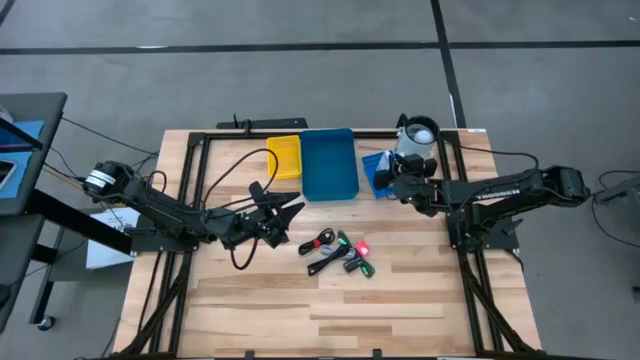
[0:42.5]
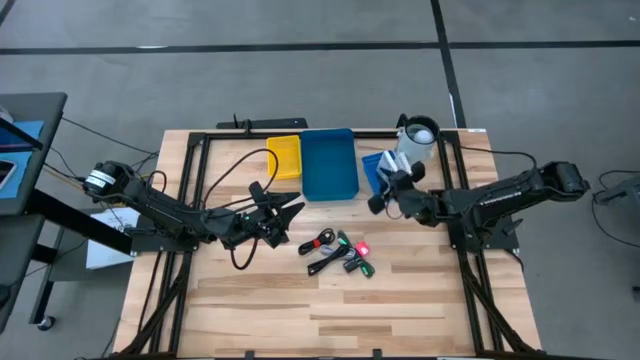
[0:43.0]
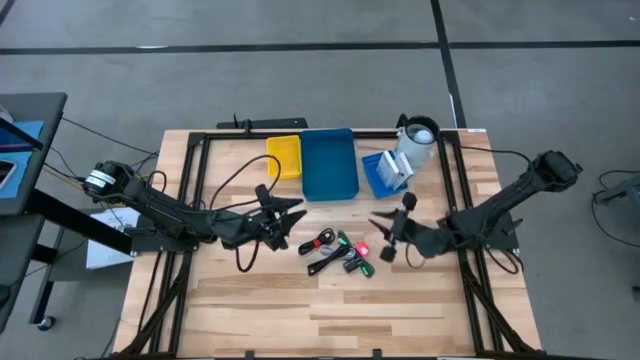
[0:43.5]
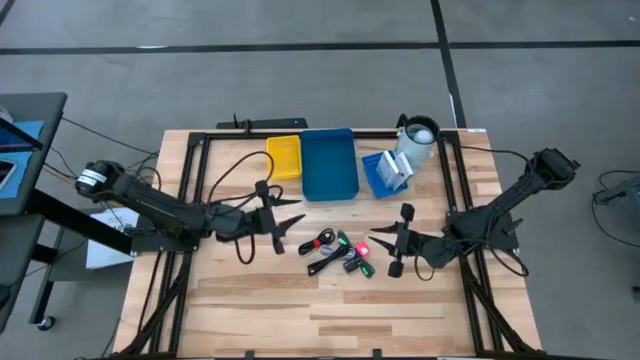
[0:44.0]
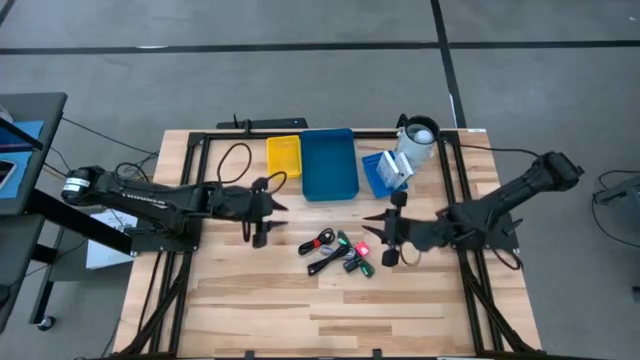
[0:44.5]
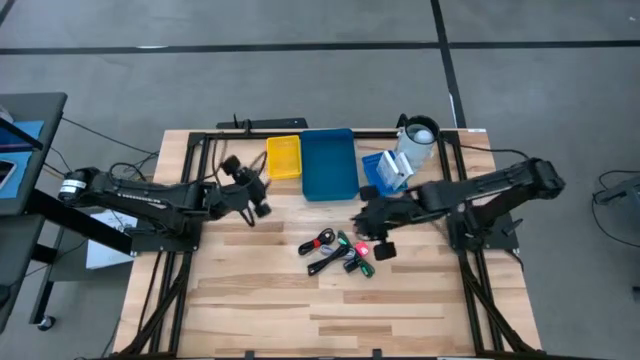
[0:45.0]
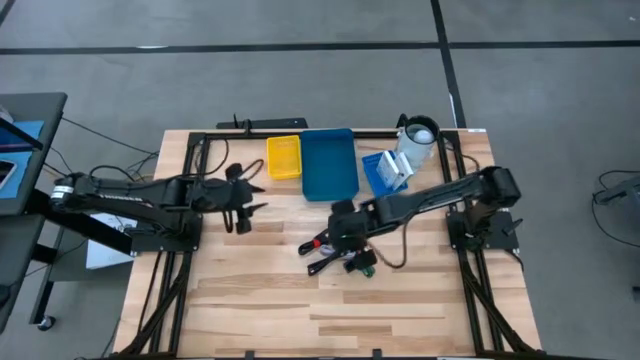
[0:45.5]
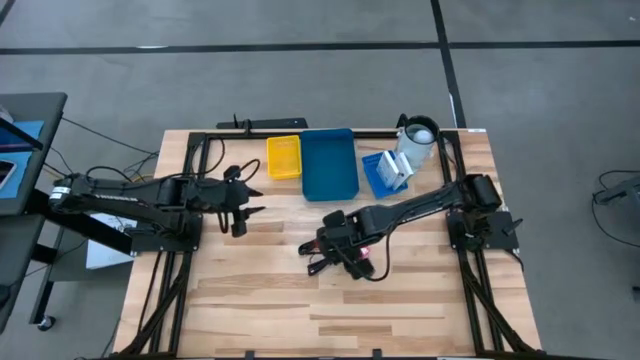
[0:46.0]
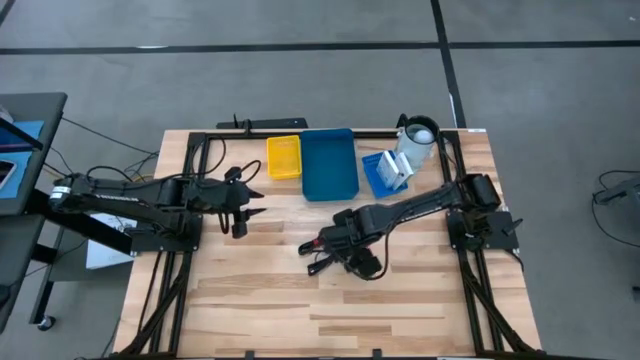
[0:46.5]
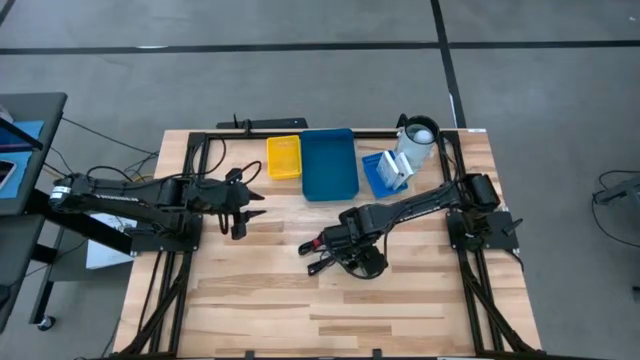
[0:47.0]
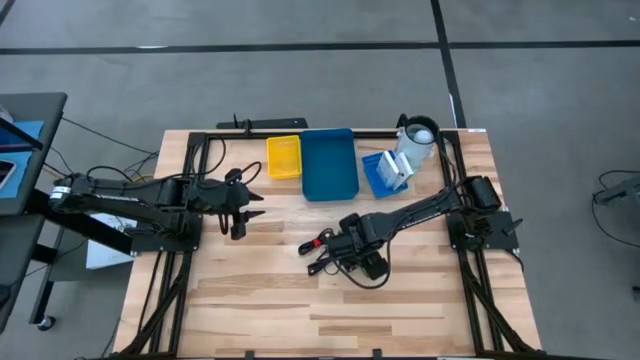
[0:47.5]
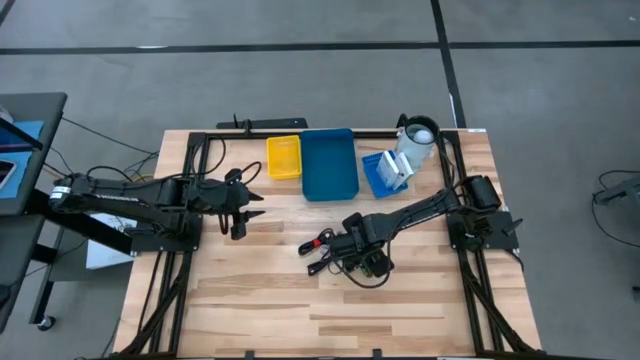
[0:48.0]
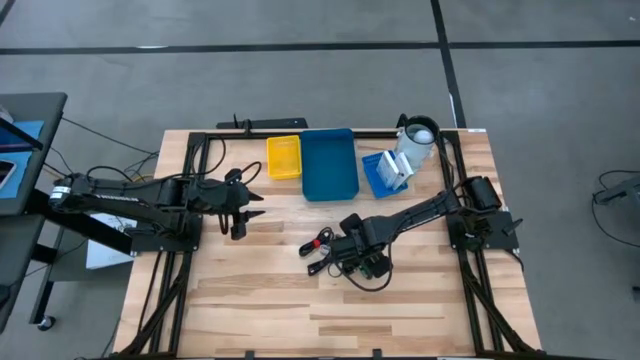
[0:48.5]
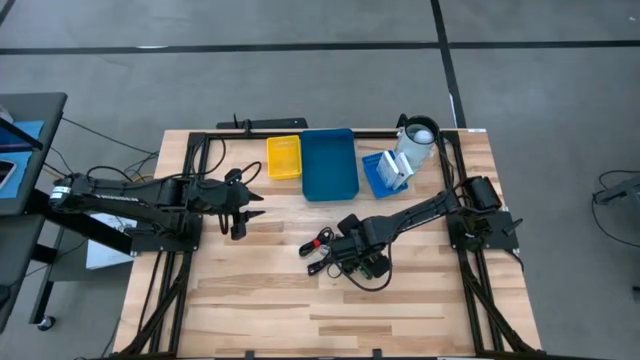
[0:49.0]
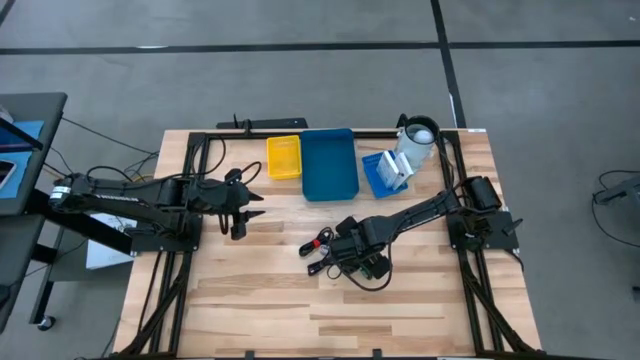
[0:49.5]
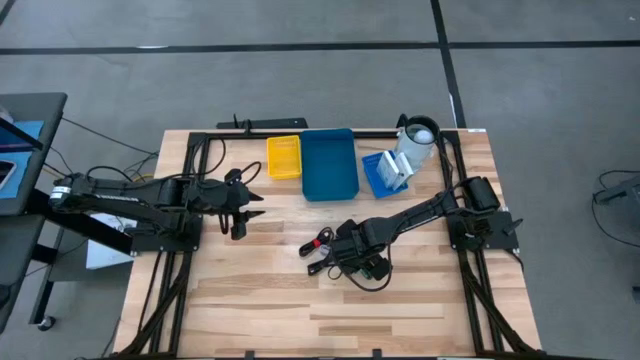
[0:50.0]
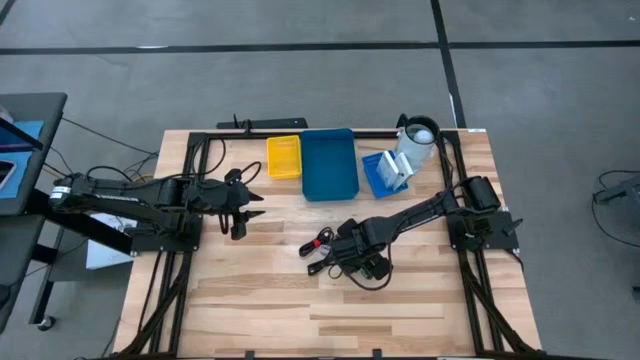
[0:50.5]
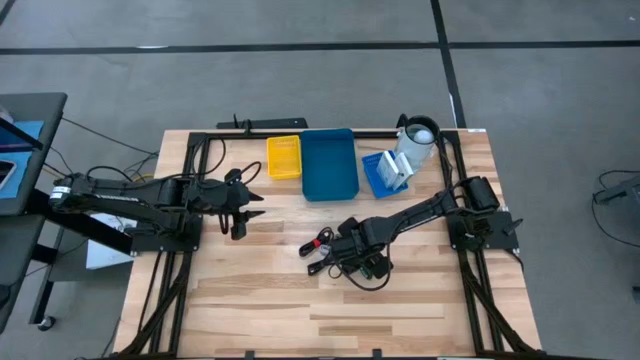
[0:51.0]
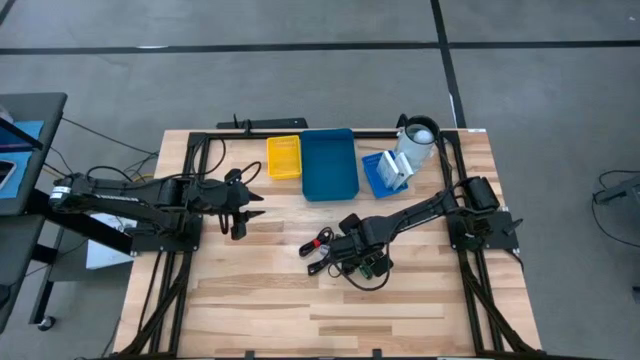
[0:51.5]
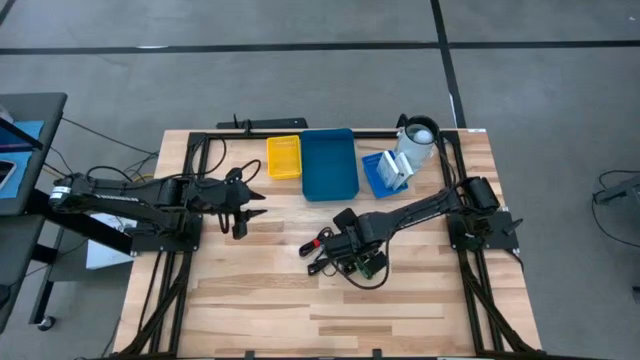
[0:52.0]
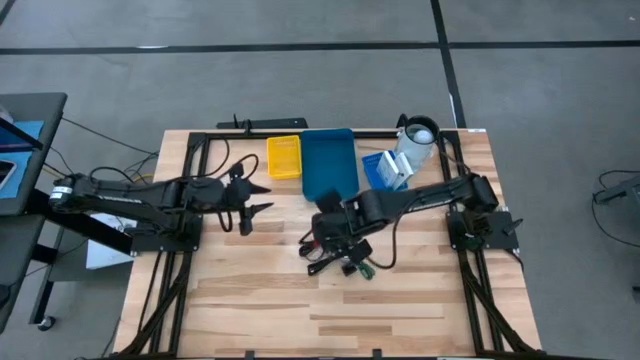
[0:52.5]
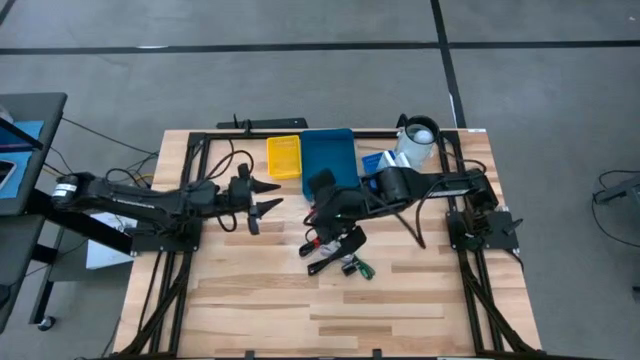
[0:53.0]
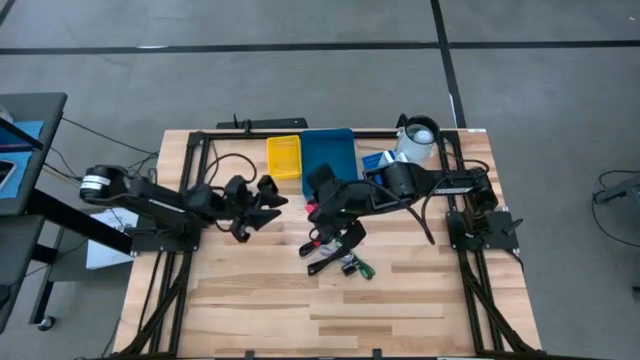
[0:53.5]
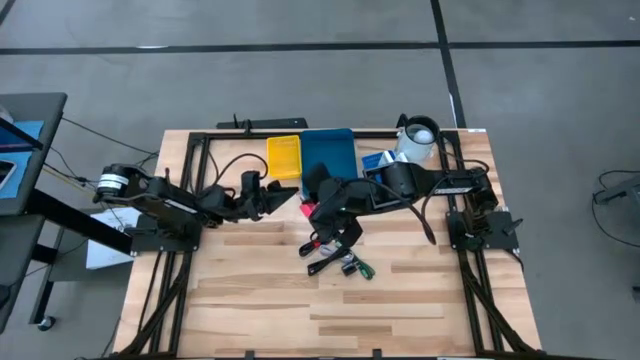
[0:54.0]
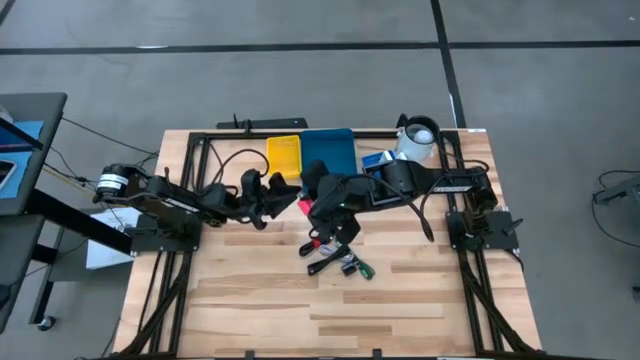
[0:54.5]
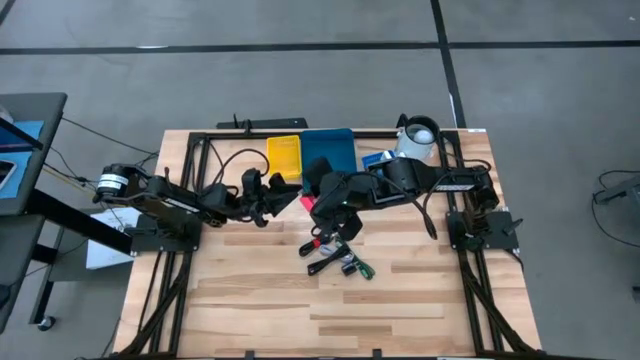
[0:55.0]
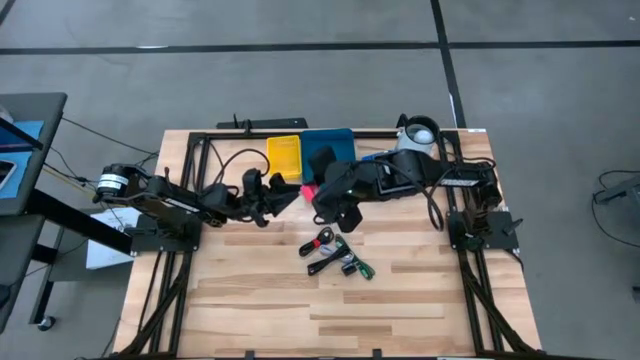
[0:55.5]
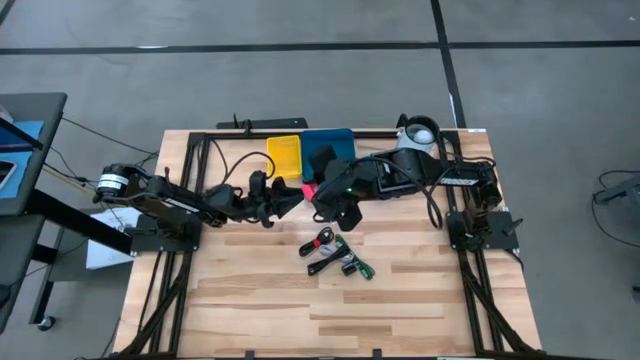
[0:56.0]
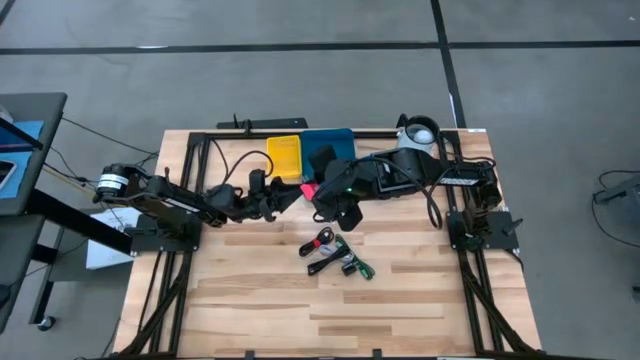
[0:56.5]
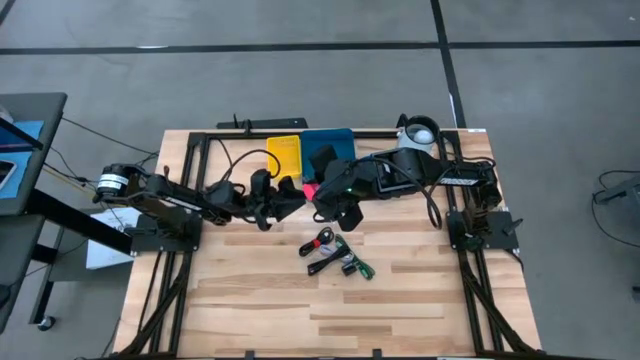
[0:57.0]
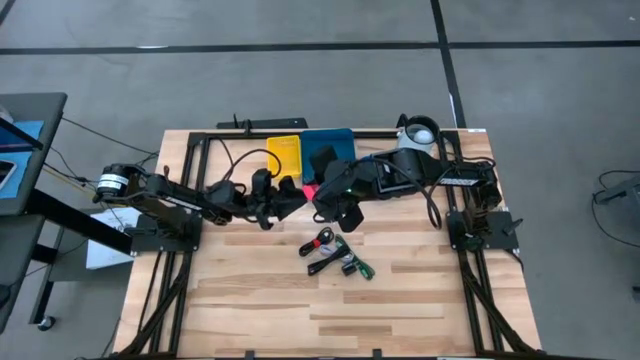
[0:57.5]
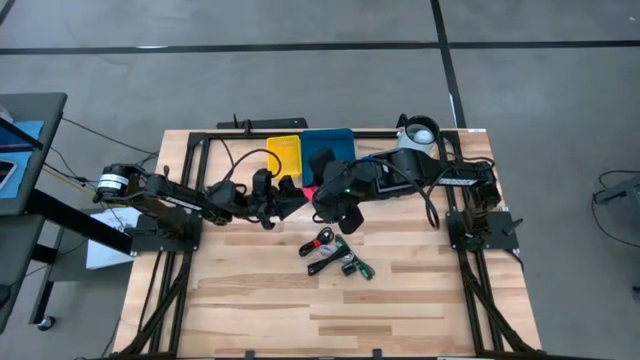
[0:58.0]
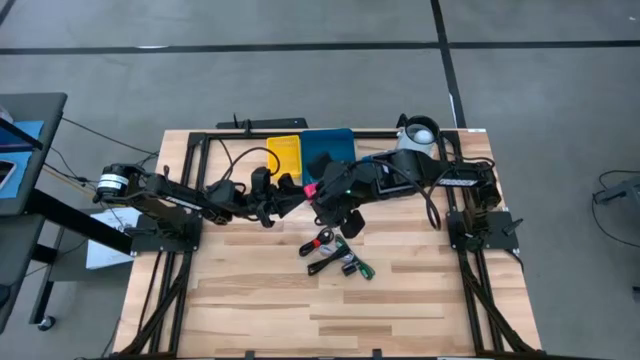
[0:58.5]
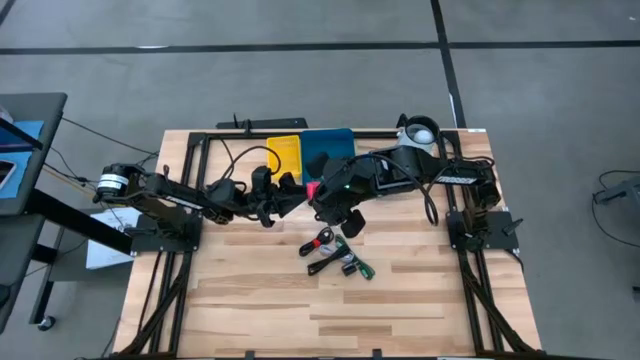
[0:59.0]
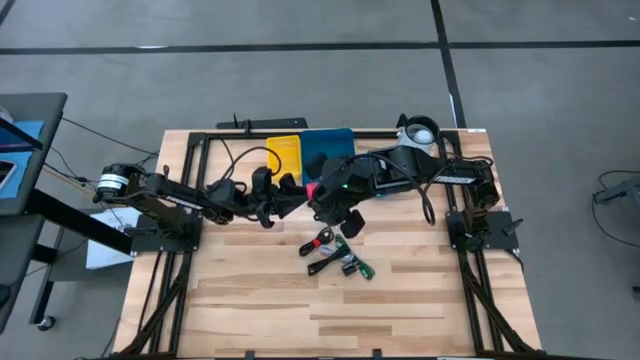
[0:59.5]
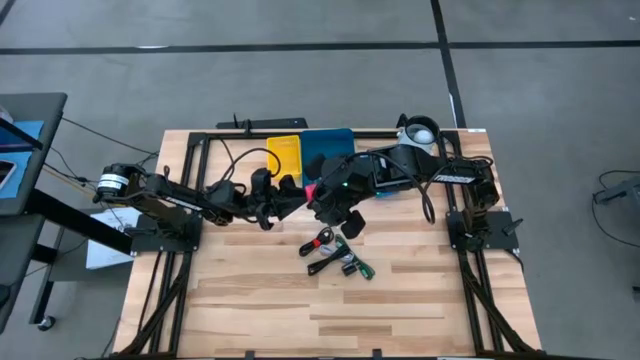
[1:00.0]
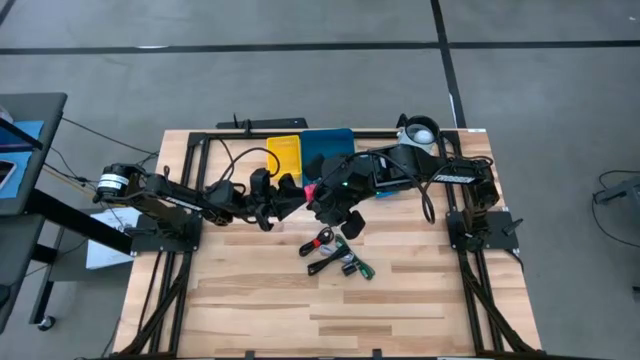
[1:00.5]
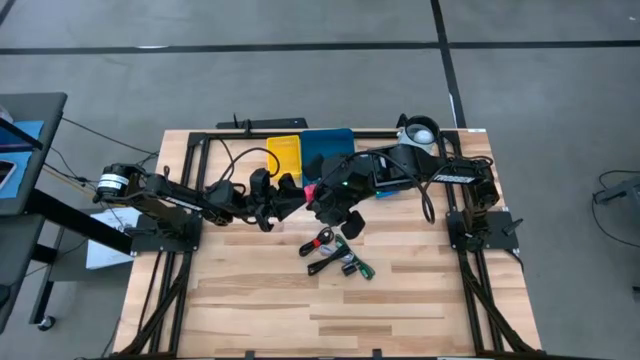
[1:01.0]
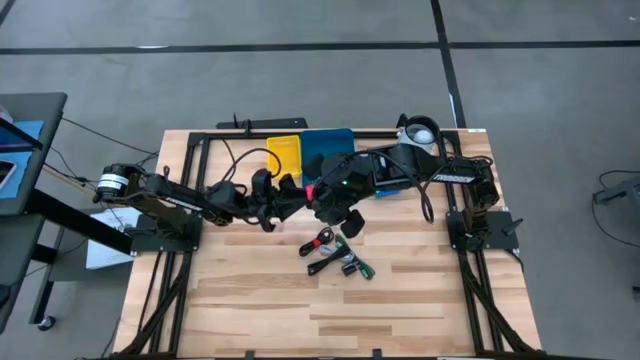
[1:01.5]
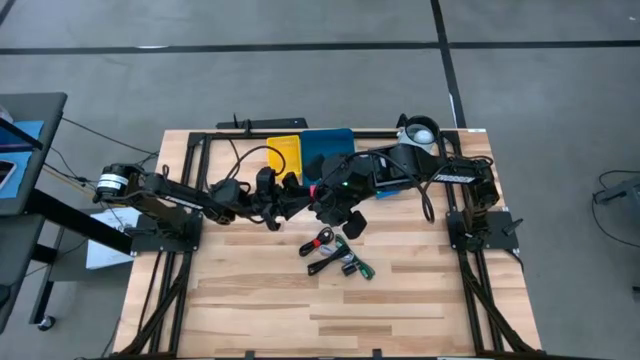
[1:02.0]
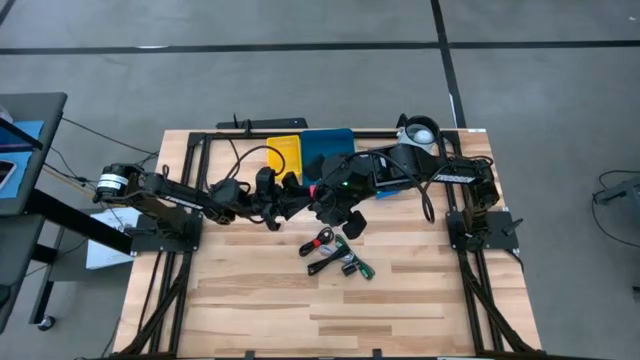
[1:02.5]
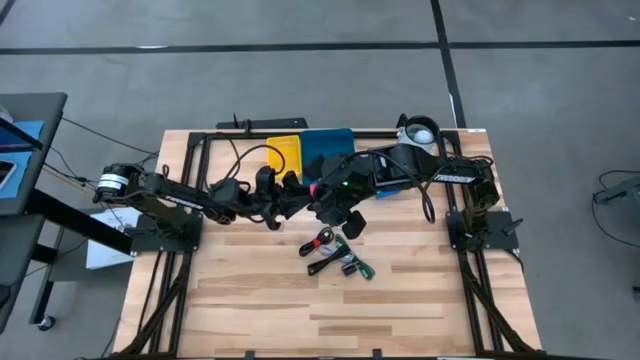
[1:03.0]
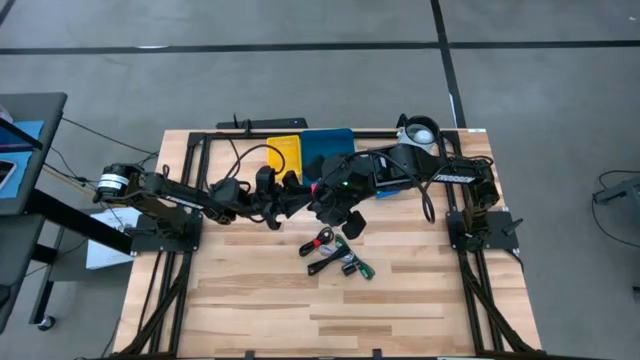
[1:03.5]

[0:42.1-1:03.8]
Task: Pick and place items into bin
Put the pink charger adapter into the yellow basket

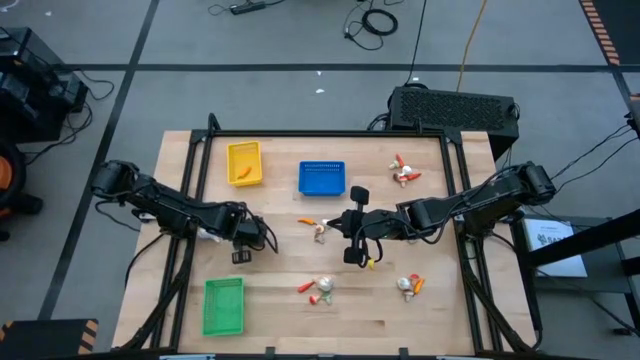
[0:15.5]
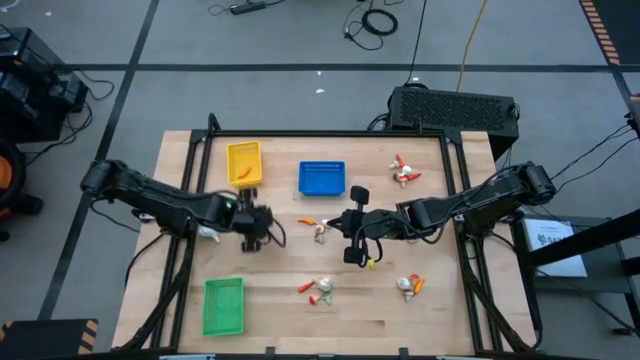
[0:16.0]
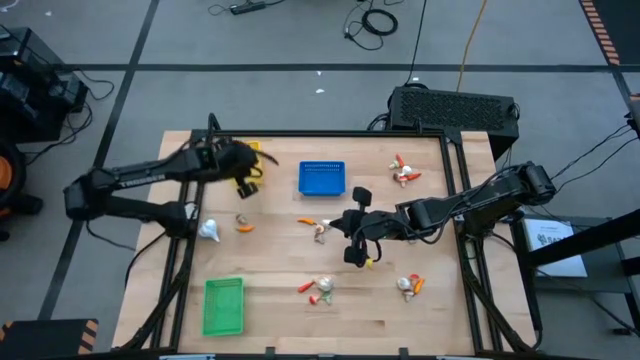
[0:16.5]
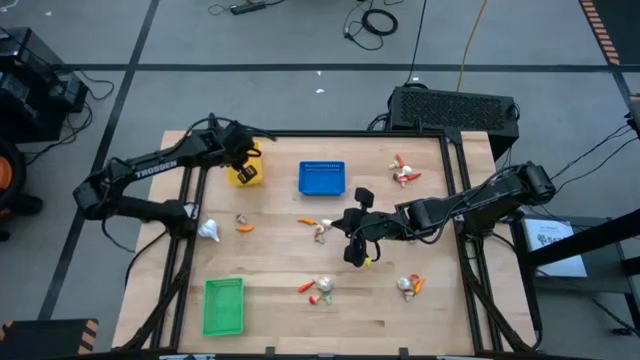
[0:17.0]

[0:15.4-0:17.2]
Task: Sort produce into baskets
Put the yellow chili pepper into the yellow bin
